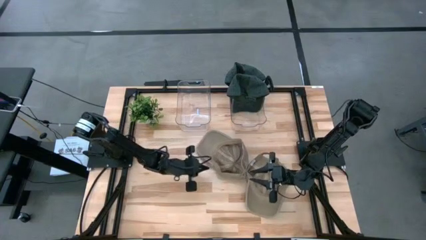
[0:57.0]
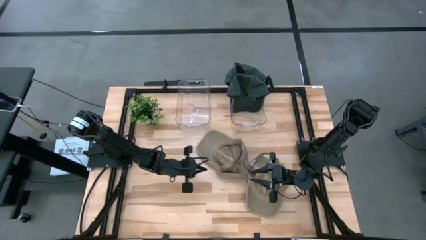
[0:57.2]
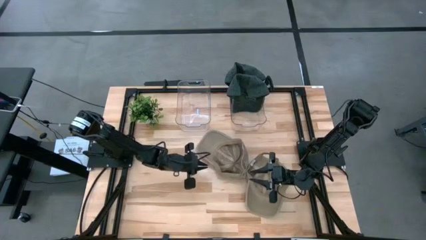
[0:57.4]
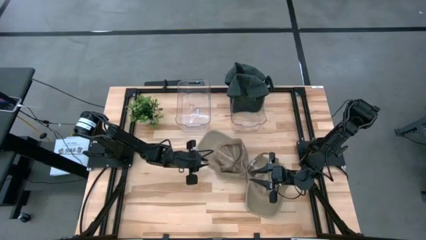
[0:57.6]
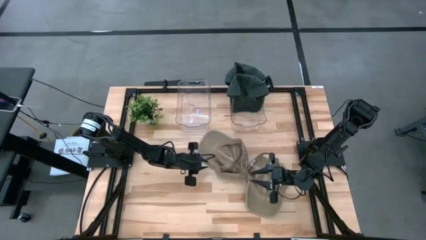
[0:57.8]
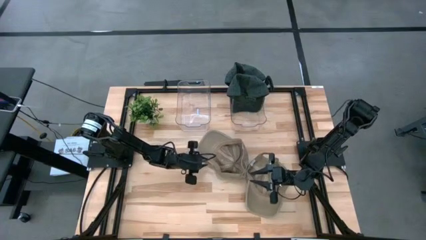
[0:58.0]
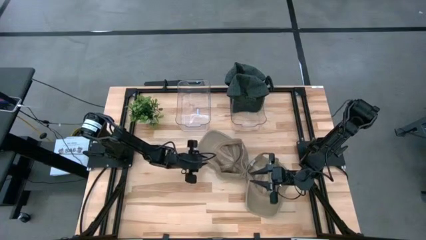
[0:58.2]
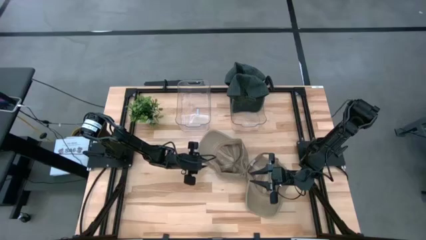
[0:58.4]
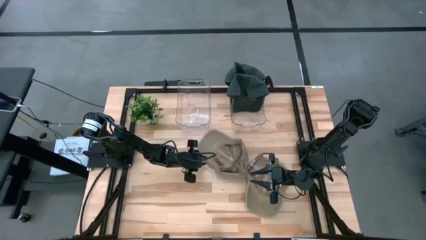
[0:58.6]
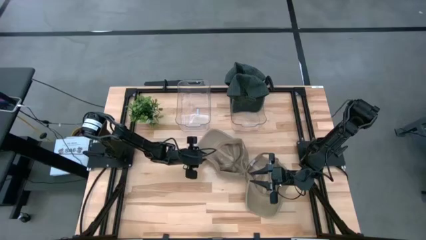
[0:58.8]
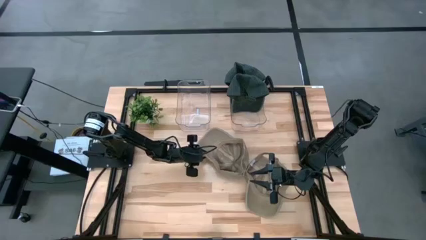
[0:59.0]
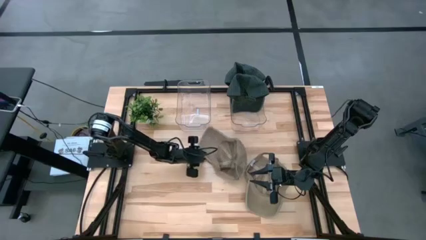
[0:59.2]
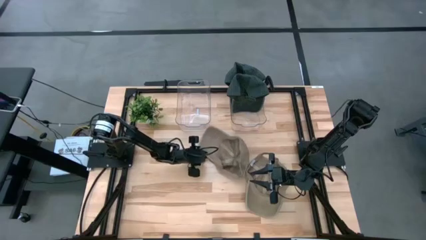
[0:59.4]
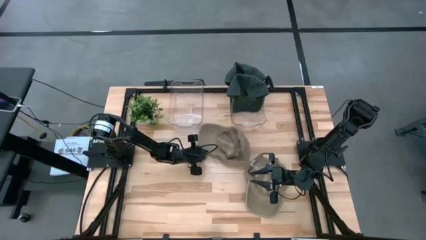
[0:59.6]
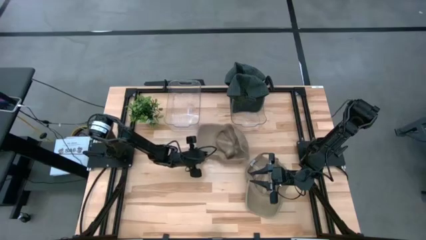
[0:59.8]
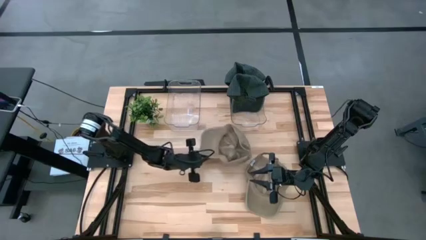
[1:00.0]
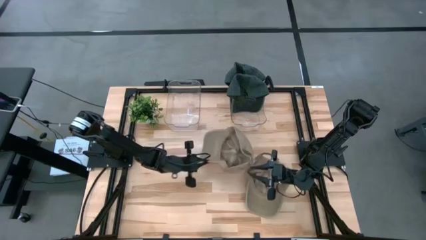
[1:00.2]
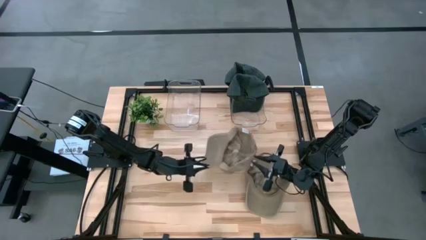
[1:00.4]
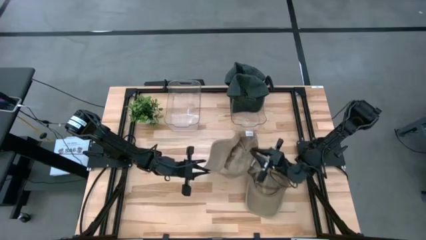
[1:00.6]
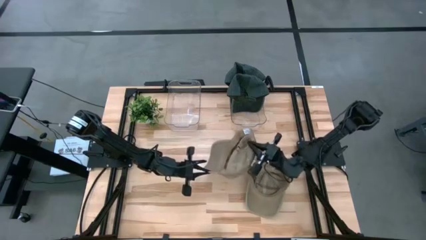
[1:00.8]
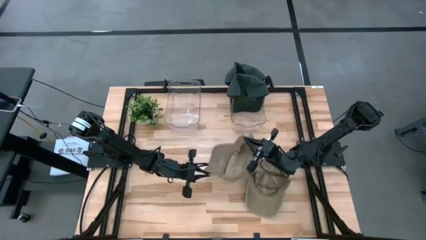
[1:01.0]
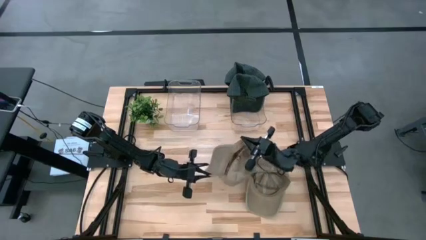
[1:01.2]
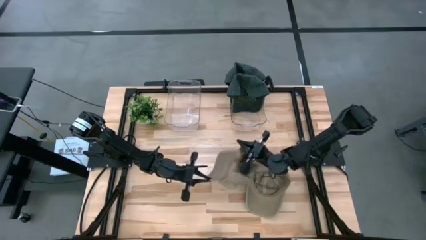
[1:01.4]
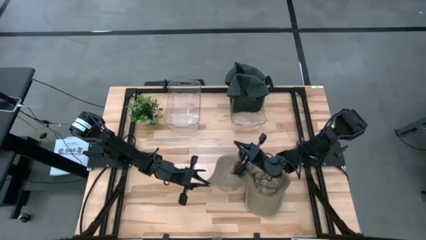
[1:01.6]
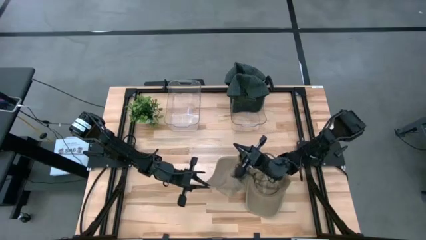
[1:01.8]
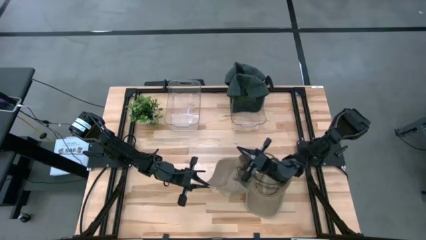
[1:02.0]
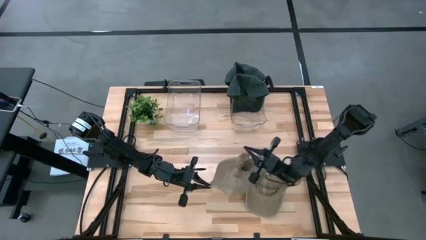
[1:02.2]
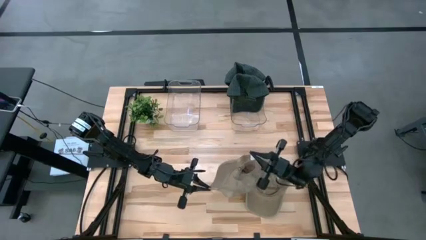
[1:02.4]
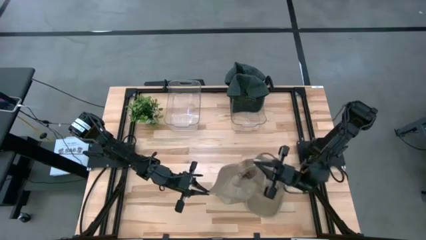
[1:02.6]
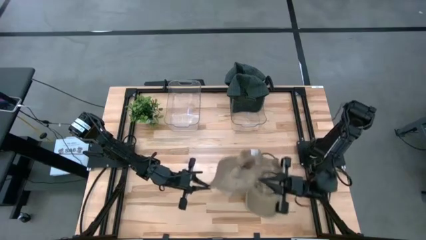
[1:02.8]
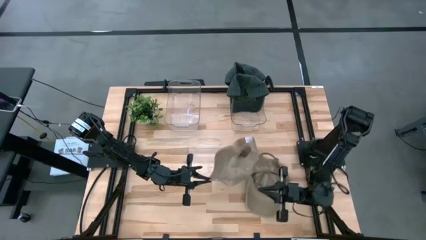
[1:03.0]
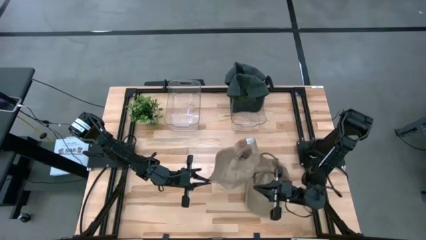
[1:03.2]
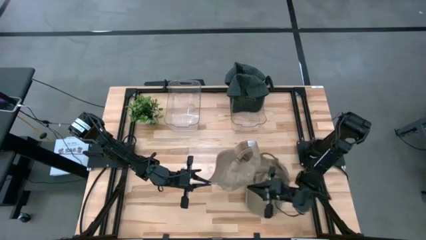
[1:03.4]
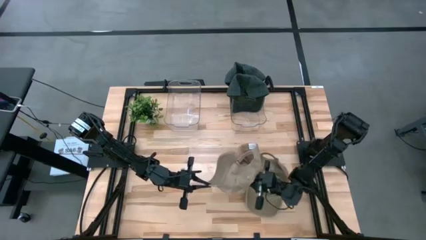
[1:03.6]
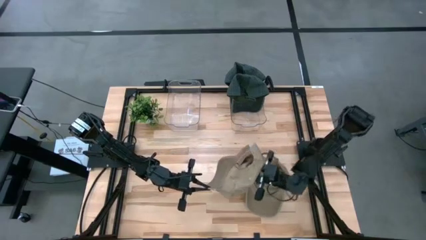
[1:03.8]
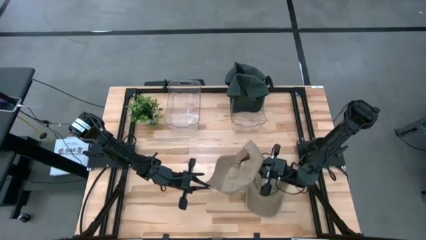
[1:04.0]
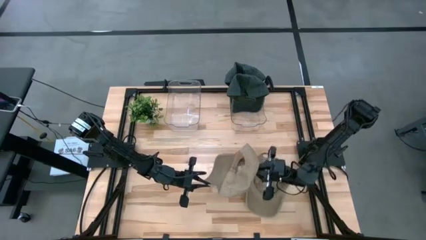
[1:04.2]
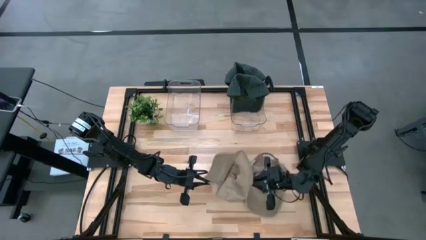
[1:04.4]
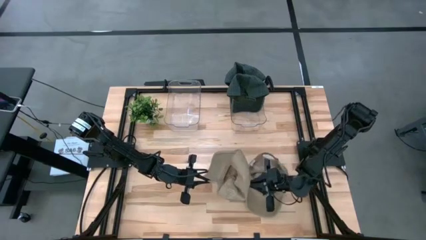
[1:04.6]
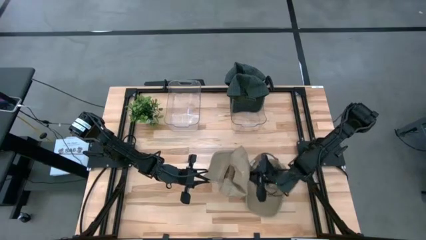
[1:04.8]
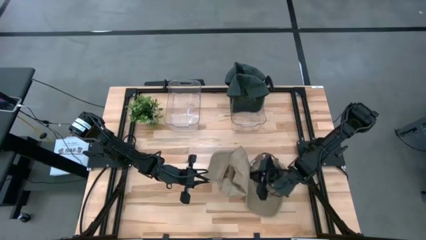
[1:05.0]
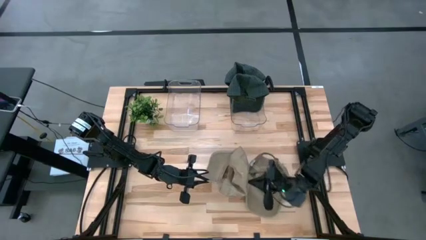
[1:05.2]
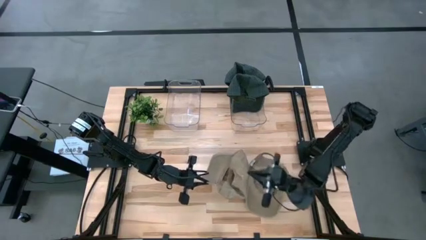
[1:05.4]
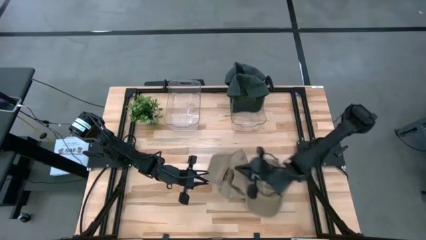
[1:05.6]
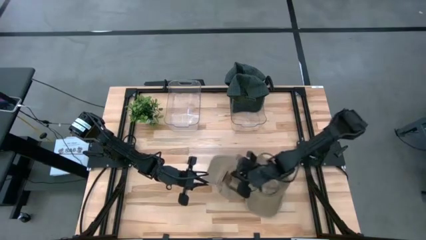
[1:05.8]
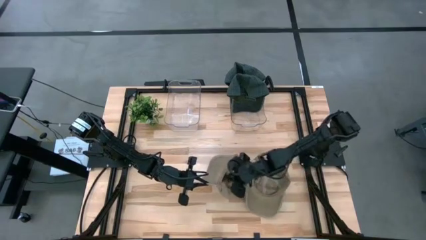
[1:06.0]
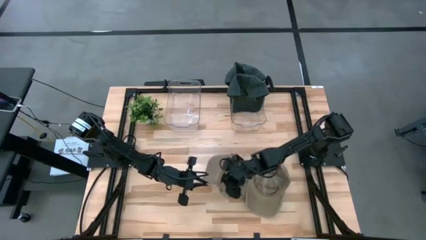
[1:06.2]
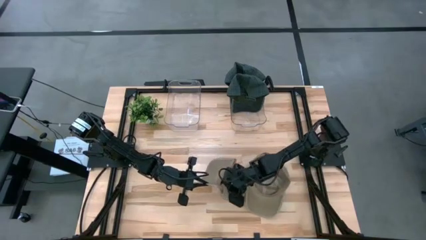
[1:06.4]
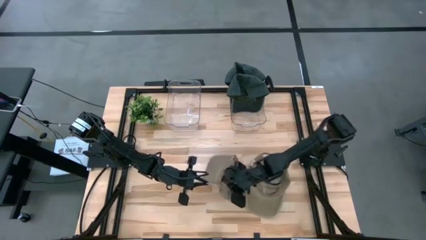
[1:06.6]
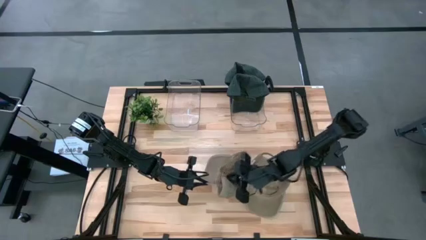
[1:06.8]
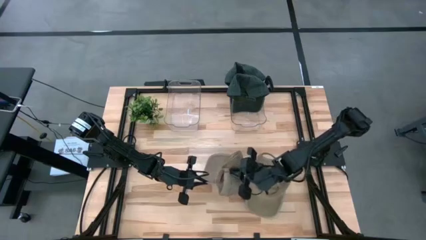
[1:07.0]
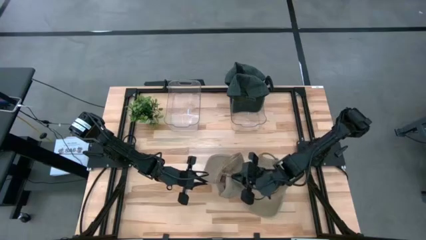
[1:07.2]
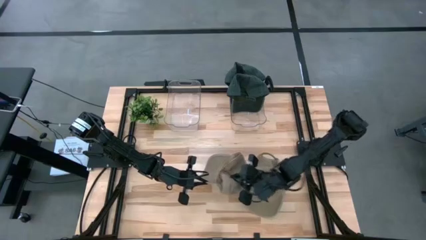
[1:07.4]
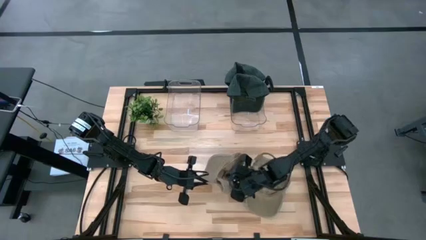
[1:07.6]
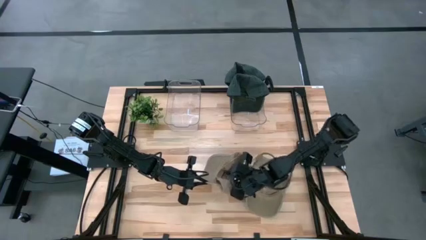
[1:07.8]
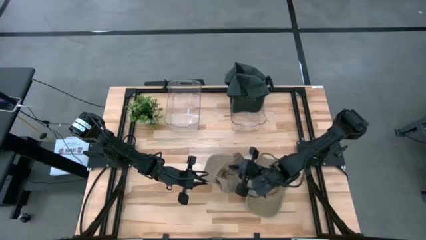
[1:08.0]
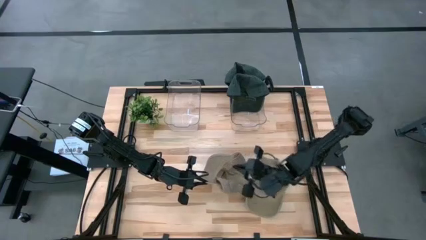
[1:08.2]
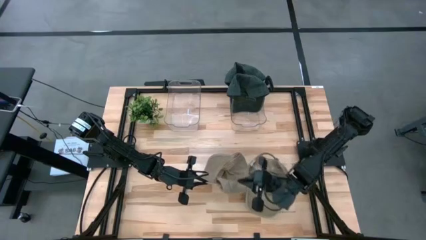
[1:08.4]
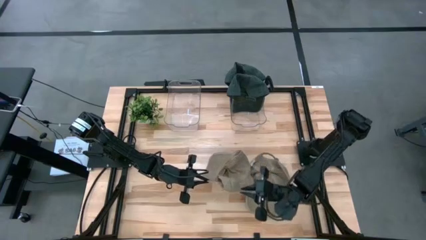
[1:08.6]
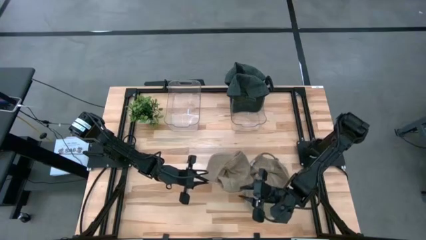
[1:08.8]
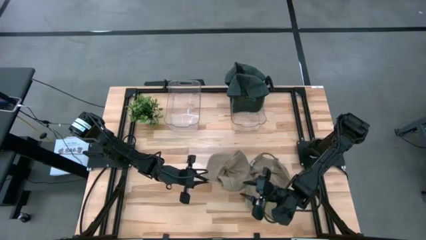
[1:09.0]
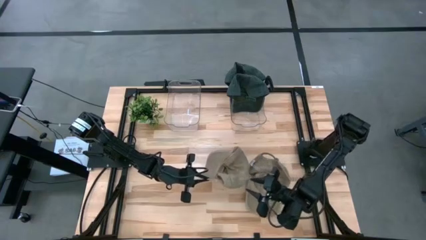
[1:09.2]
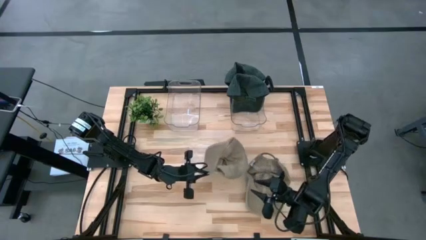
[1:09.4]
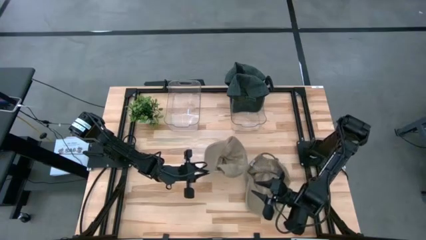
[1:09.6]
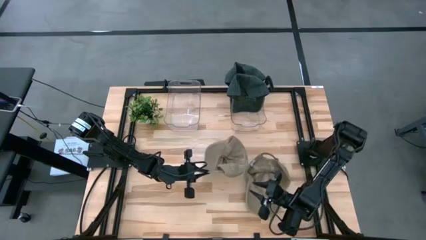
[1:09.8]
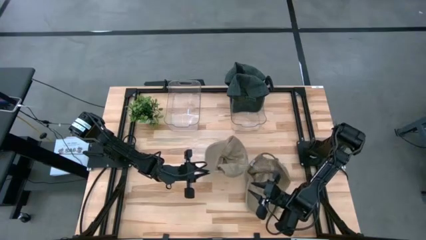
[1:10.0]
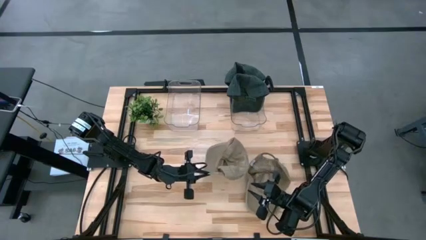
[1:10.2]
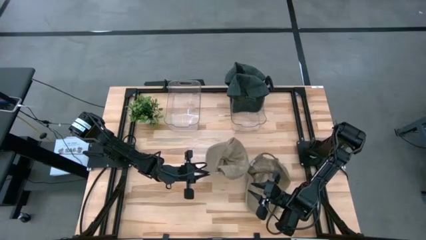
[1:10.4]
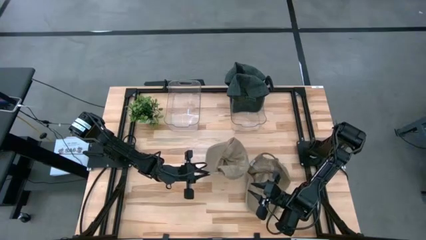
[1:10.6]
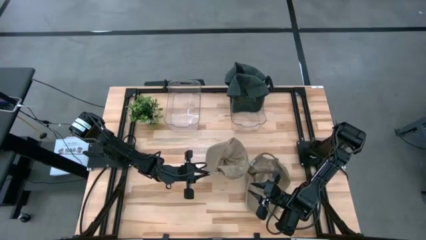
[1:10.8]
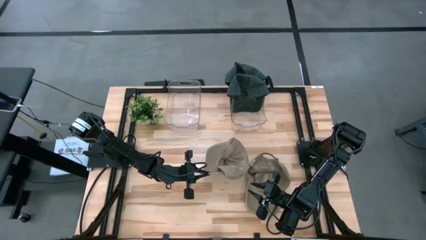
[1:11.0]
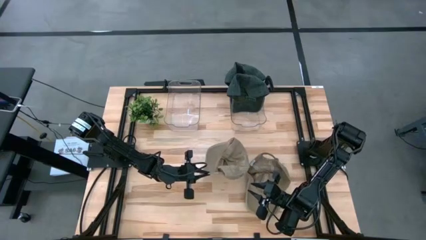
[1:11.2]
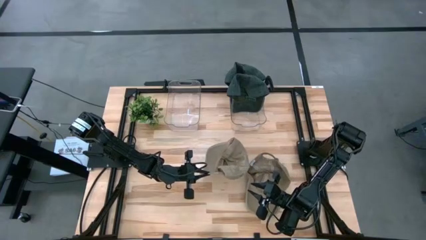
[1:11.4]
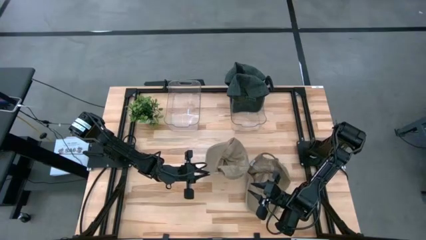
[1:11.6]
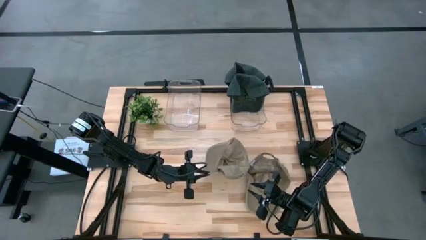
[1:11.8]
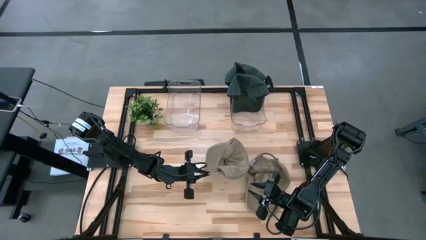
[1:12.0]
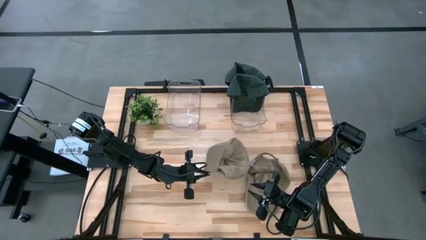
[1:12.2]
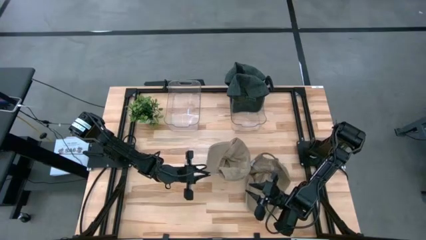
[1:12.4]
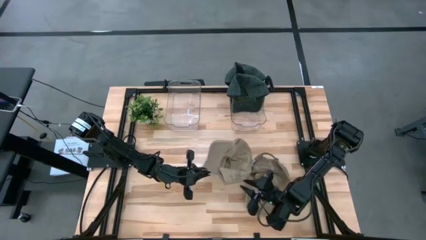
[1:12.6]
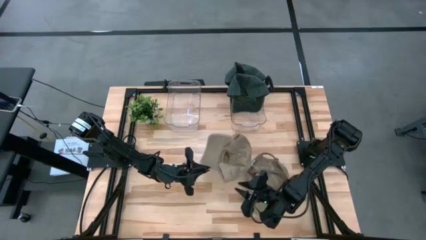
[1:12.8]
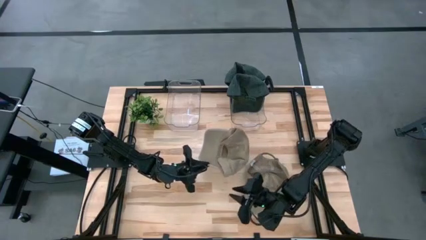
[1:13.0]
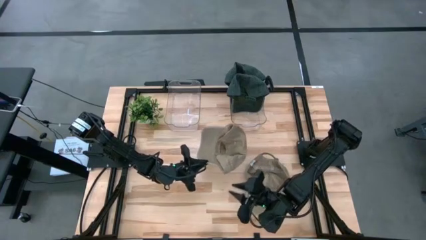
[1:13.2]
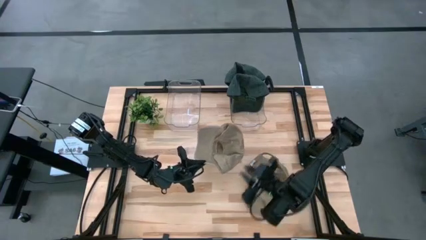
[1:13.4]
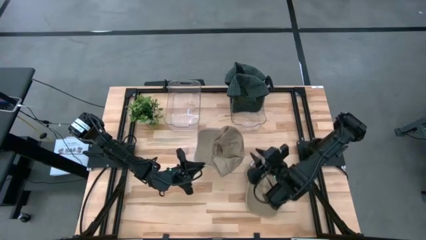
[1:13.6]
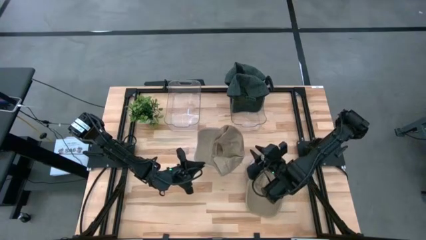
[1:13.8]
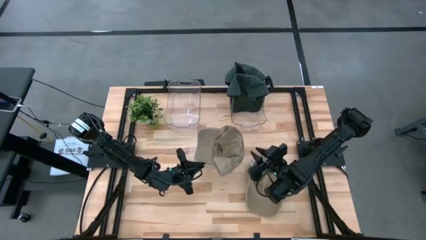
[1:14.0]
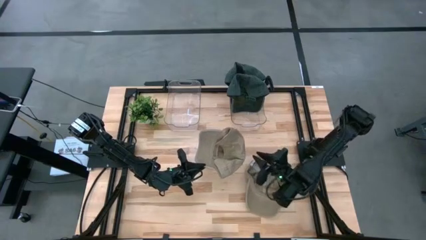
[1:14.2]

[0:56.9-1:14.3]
Task: Pick & Place hat
Put the left brown cap into the left transparent bin
